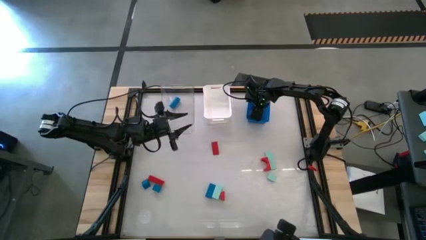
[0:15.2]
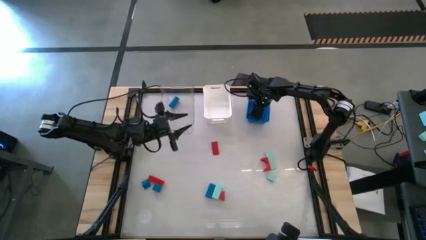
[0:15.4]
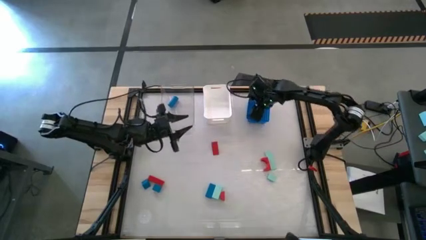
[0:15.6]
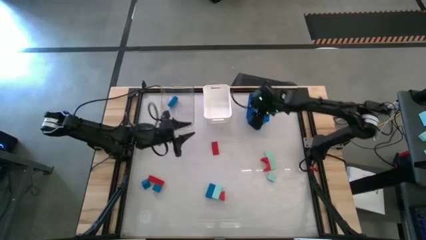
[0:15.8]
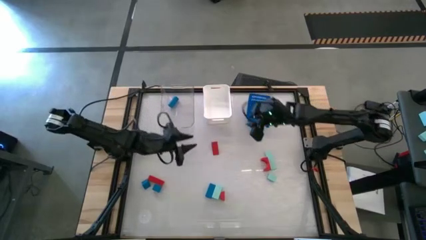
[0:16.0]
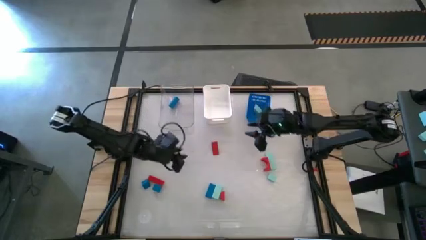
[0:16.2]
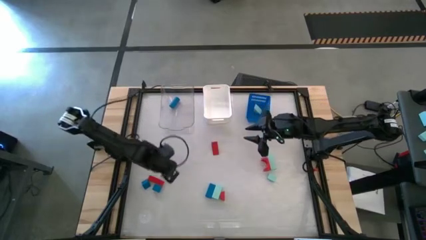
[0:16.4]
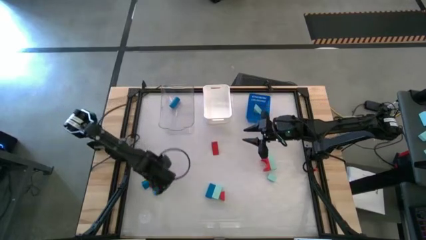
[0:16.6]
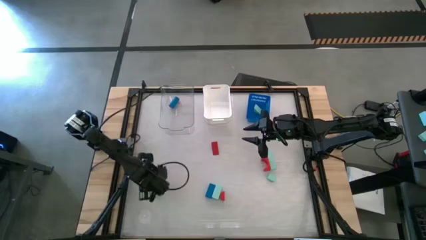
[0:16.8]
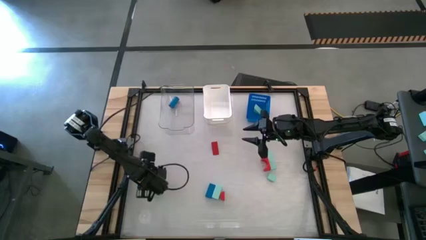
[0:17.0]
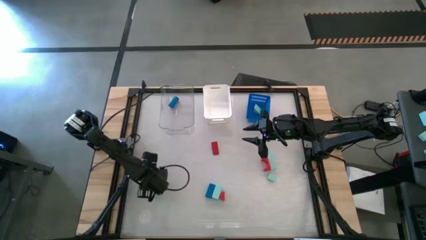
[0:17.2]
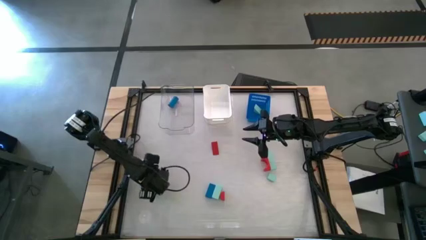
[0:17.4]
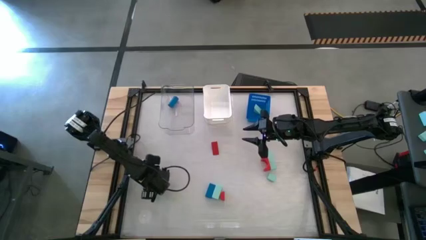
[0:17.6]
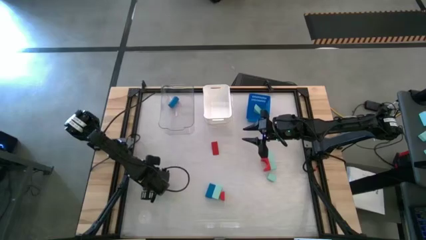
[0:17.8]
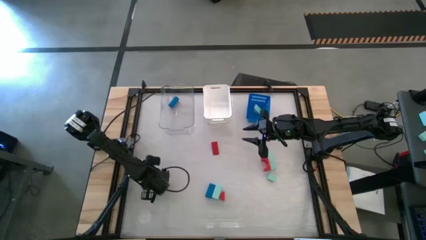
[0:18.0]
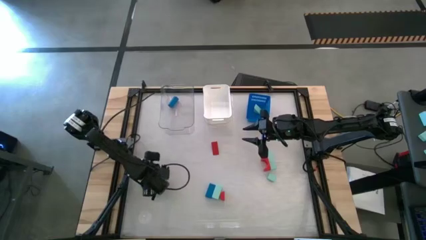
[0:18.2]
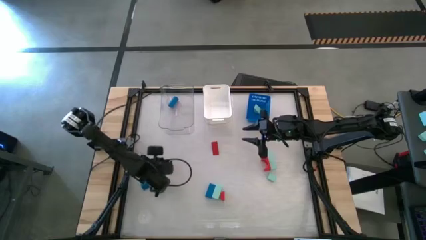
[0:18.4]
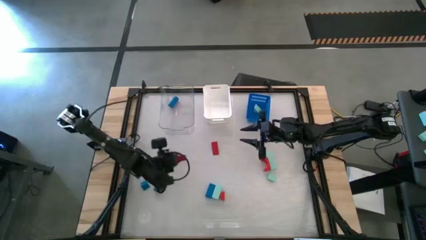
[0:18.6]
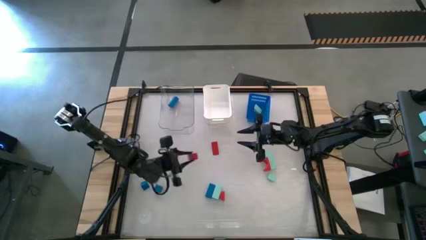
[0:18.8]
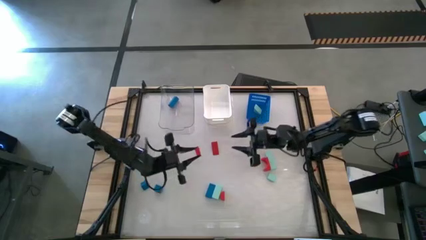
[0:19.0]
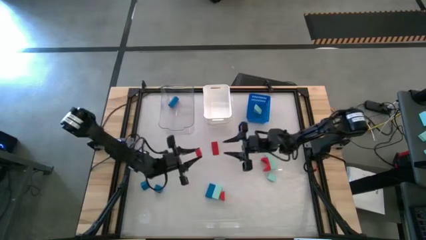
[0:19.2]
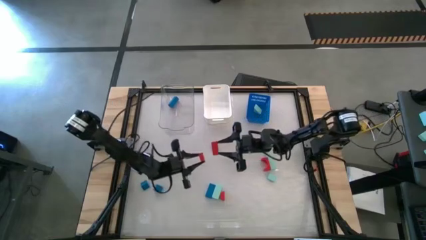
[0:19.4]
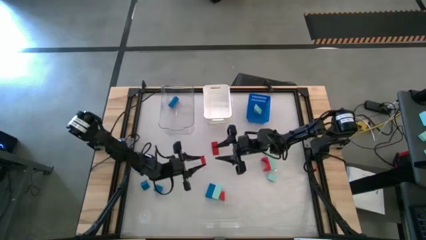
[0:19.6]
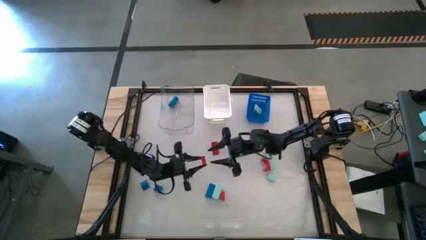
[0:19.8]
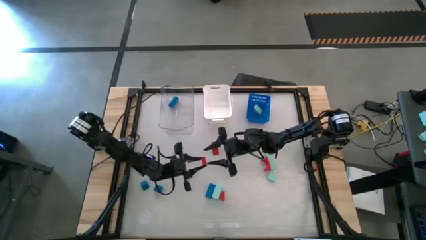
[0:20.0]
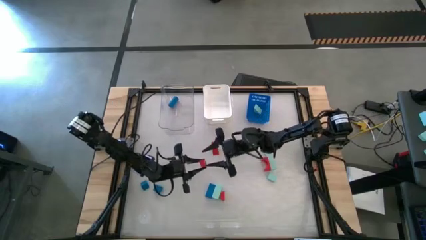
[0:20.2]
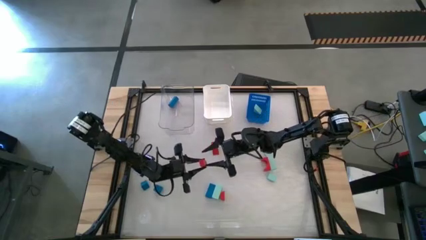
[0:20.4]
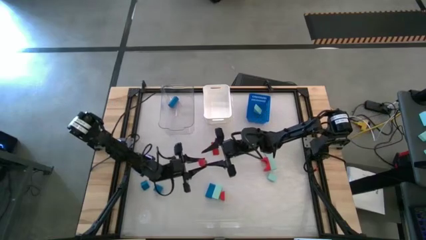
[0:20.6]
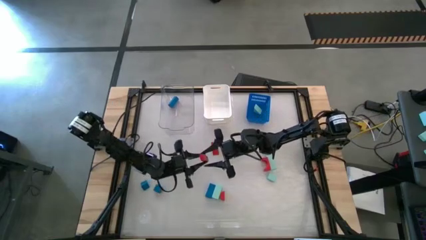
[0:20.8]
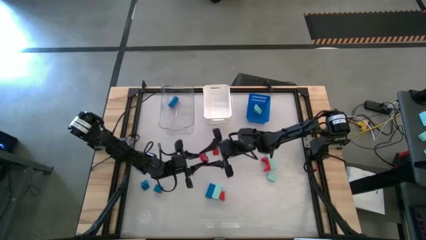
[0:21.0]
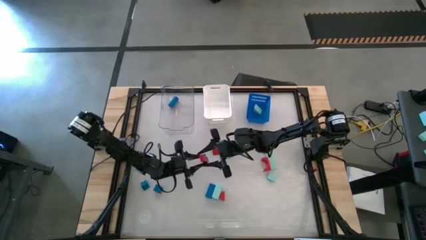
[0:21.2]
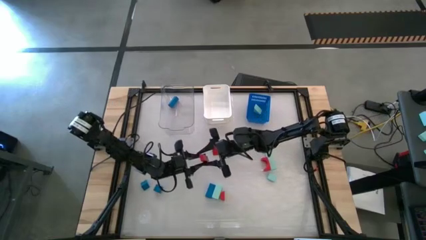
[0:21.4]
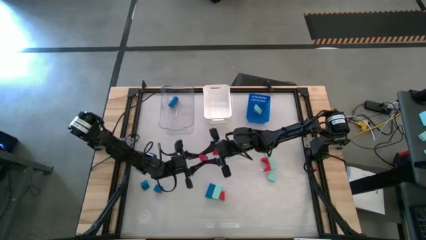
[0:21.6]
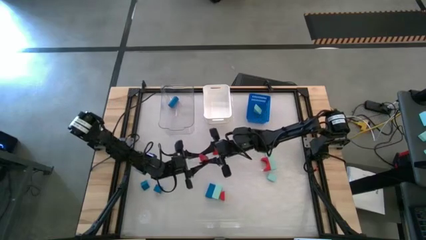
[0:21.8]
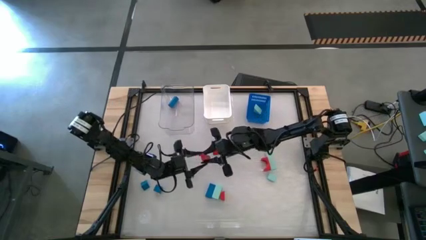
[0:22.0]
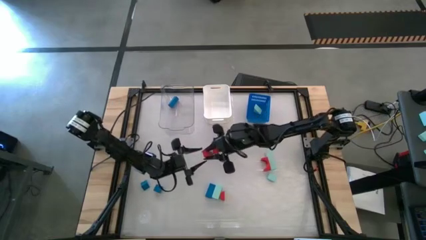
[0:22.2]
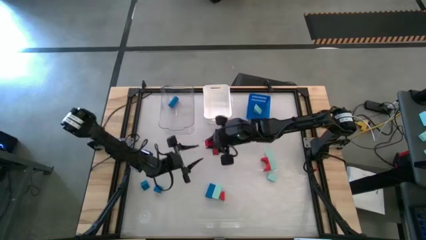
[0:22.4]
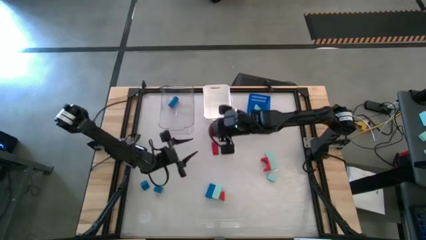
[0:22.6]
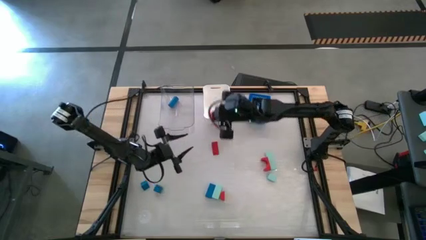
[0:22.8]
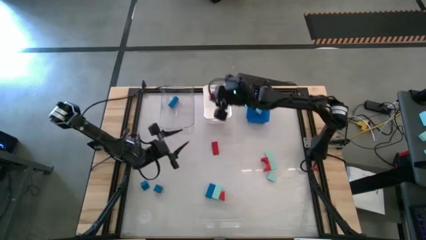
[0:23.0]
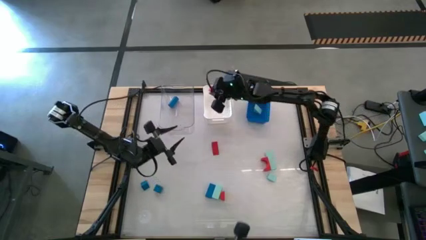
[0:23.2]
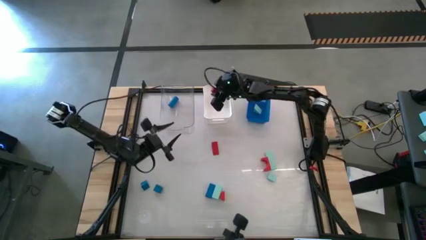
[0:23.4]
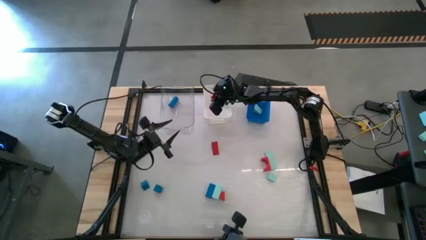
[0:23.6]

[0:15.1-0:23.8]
Task: Sort & place blocks by color
Put the bottom red block into the white bin

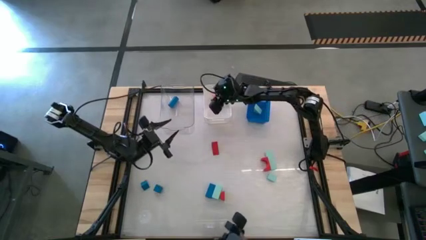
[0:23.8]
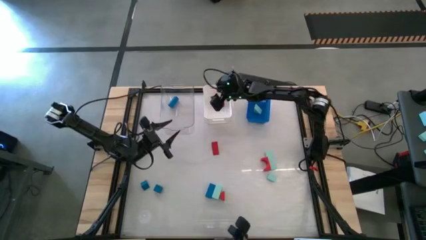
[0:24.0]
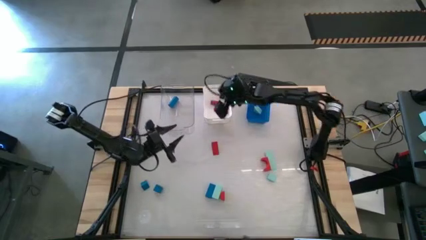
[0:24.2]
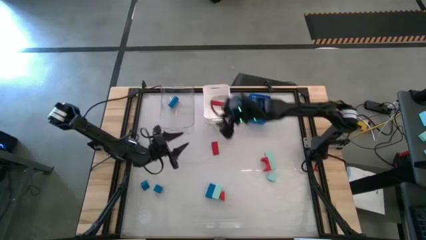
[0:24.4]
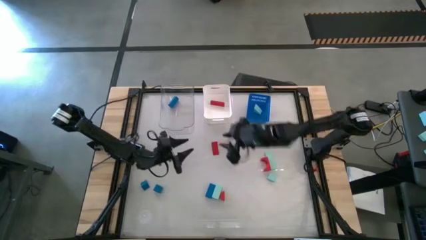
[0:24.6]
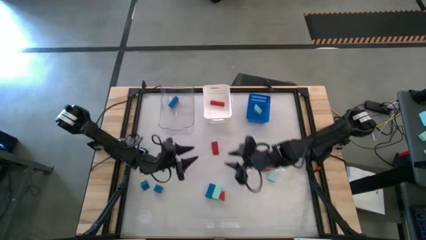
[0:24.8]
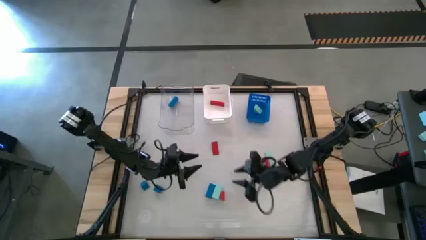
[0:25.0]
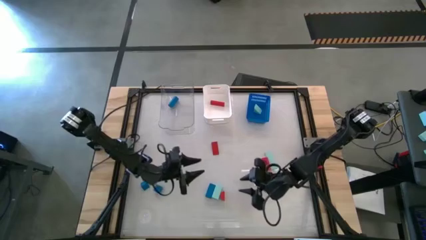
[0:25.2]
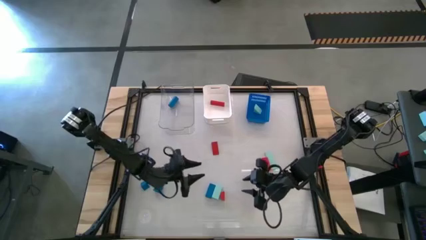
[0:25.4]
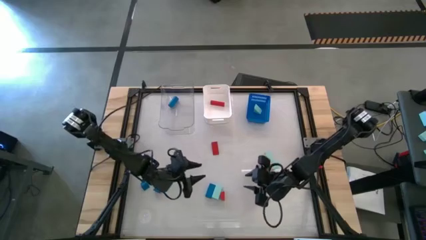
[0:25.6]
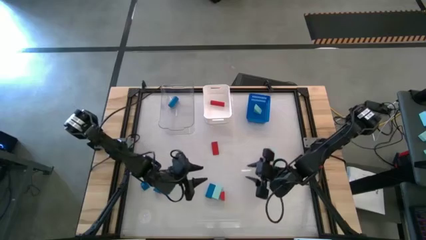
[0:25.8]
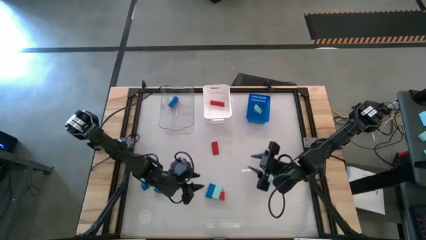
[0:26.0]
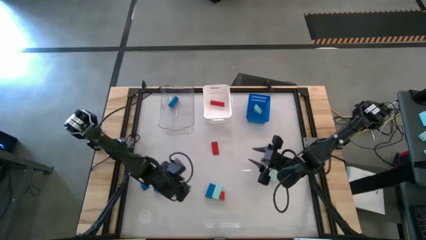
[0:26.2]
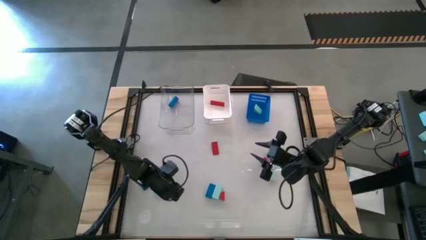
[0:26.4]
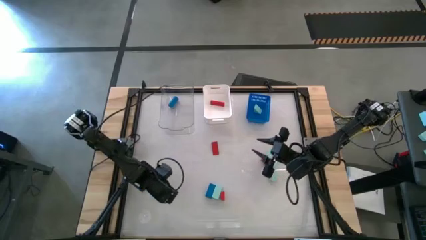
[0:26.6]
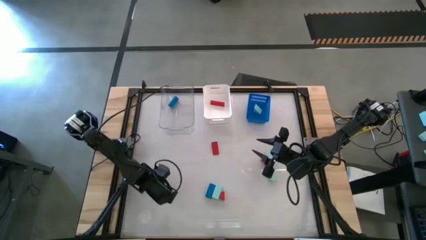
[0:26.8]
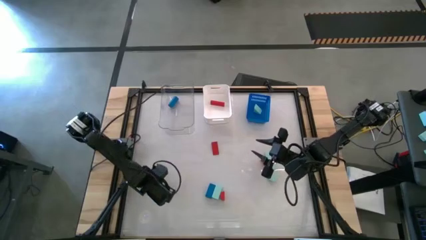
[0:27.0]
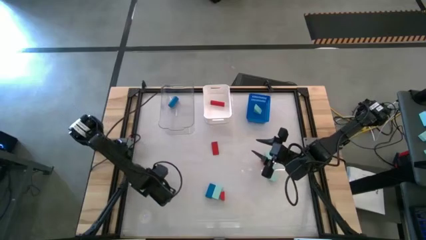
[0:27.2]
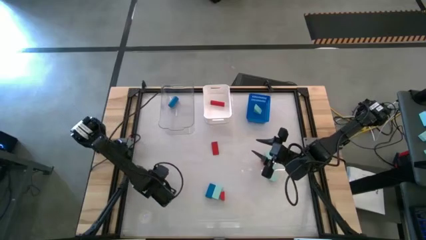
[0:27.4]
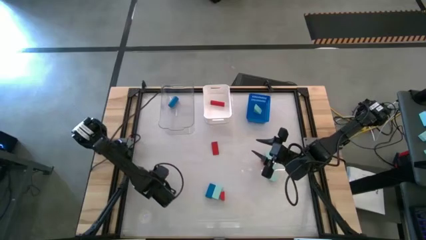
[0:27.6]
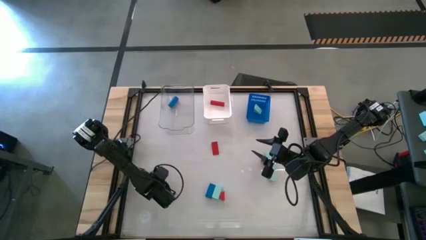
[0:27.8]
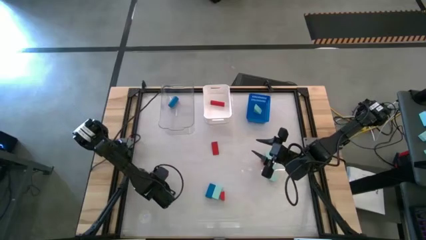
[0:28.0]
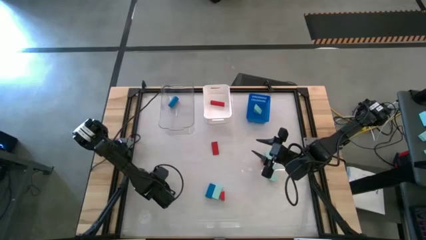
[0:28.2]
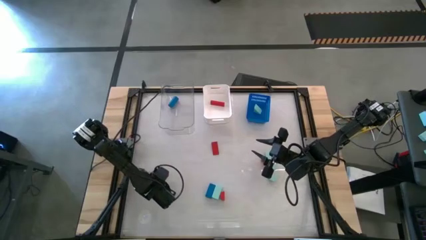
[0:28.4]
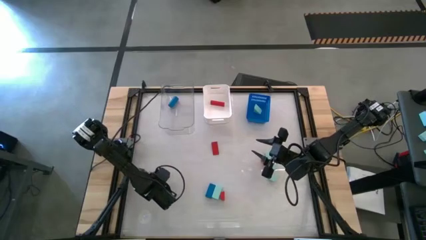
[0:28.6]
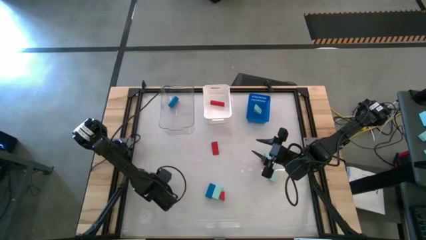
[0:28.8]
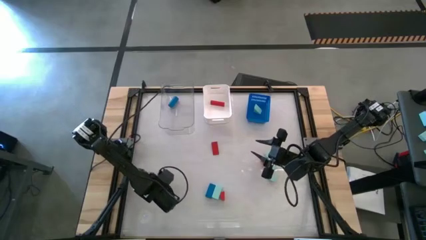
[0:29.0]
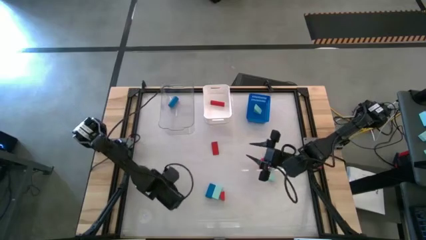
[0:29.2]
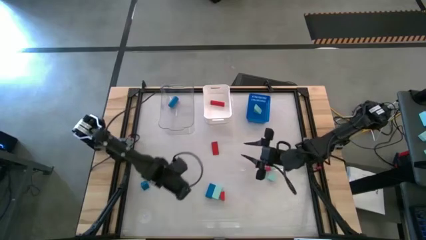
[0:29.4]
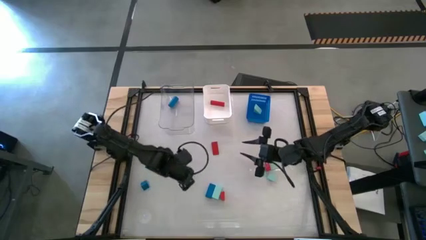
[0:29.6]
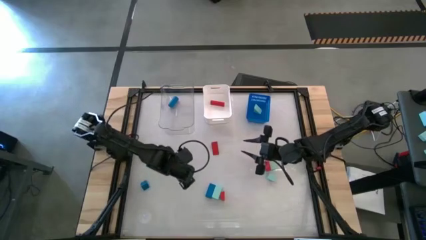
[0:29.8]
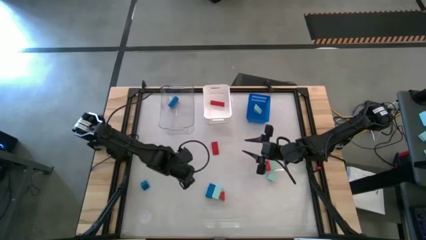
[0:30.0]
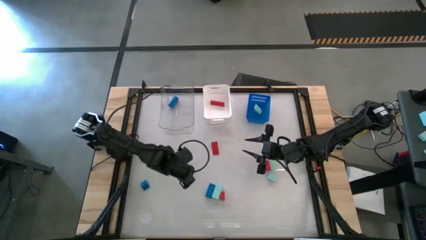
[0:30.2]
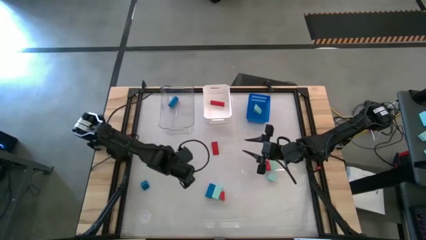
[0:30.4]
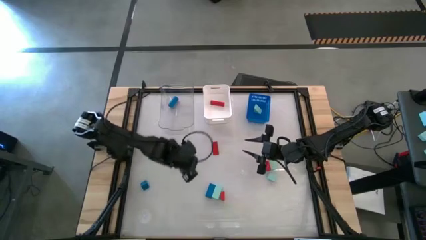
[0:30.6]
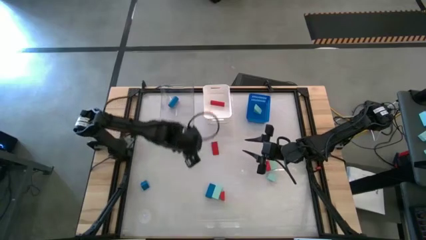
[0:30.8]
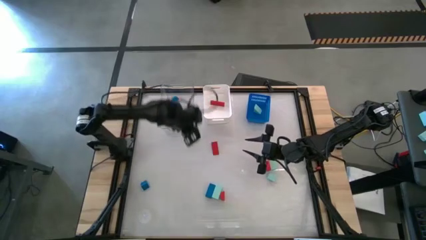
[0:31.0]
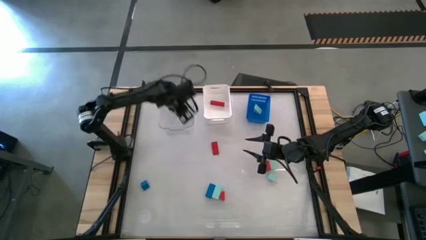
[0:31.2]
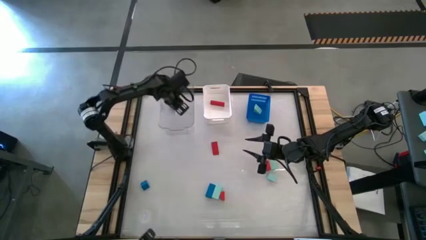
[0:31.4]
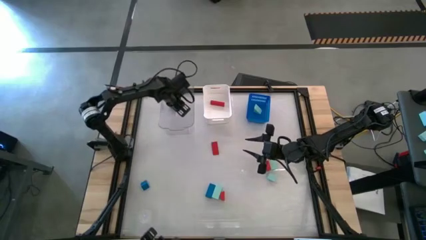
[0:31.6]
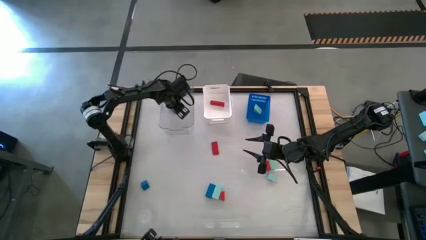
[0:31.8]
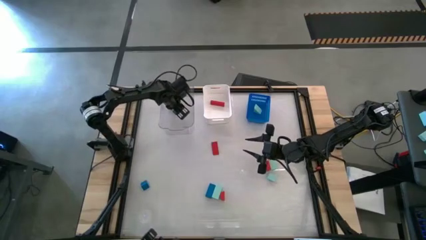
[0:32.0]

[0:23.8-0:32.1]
Put the right blue block into the transparent bin
